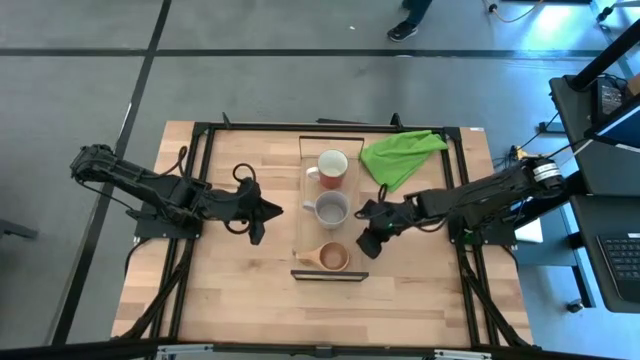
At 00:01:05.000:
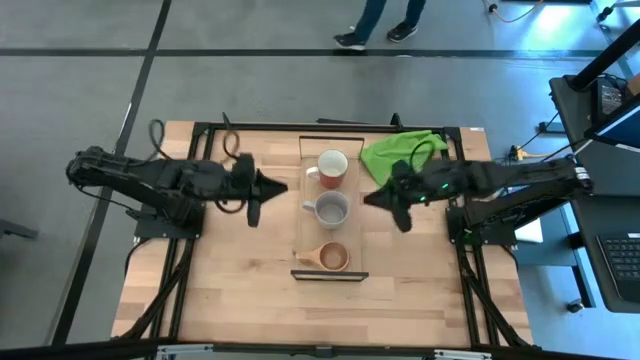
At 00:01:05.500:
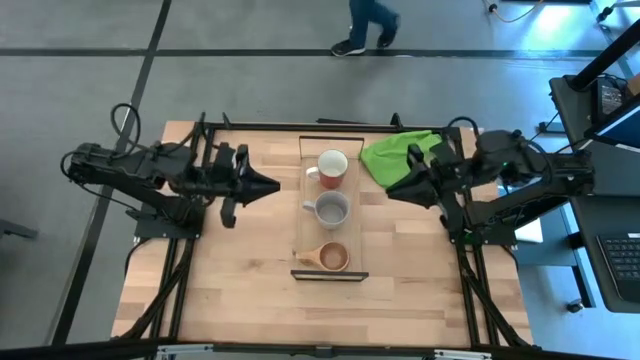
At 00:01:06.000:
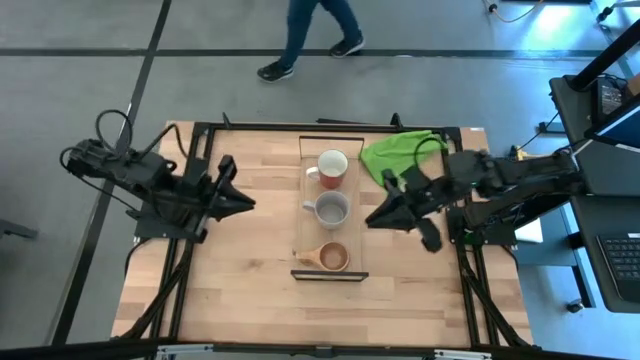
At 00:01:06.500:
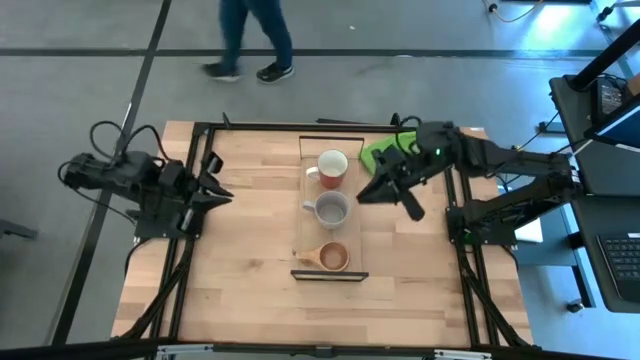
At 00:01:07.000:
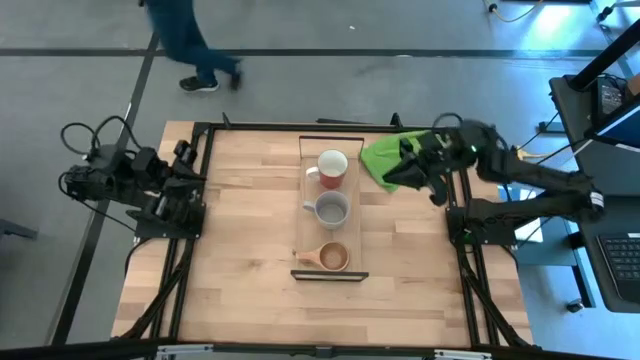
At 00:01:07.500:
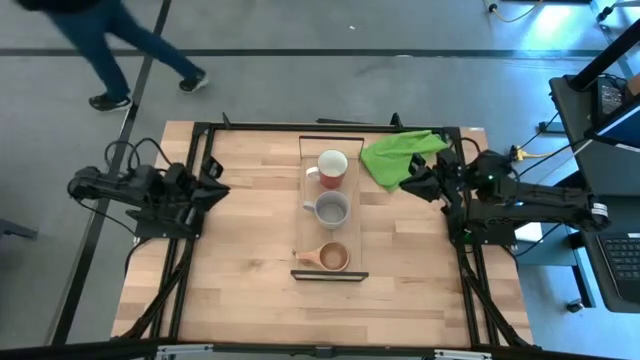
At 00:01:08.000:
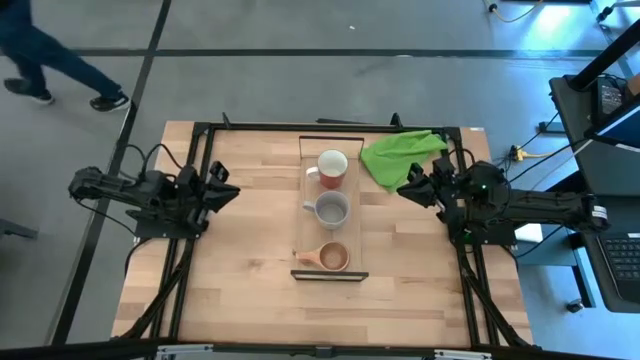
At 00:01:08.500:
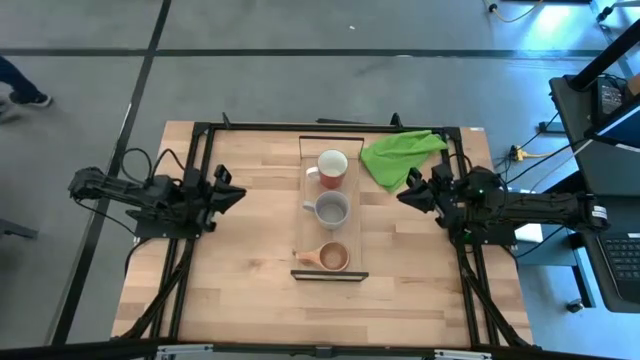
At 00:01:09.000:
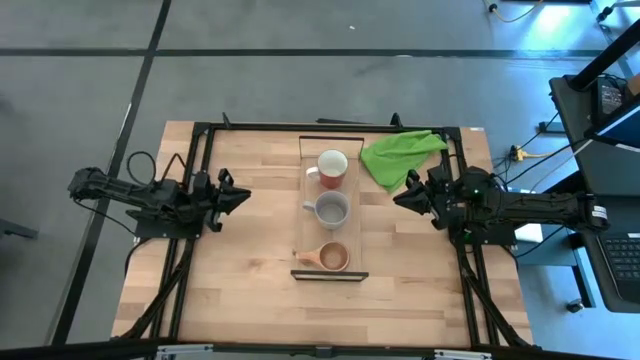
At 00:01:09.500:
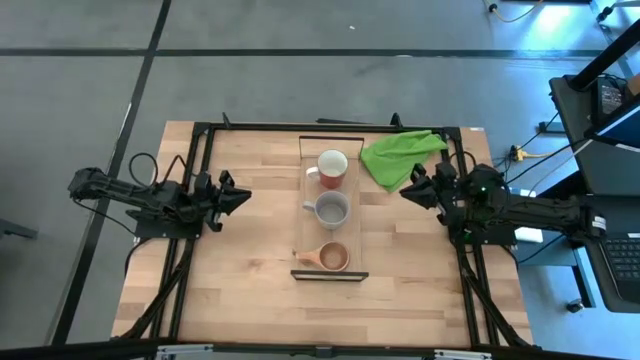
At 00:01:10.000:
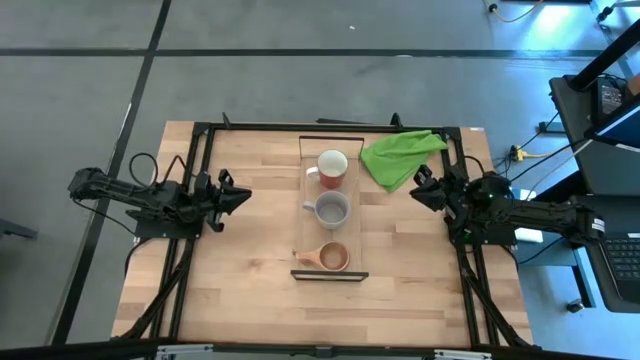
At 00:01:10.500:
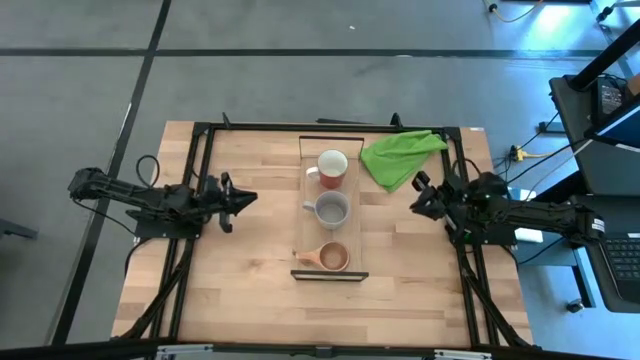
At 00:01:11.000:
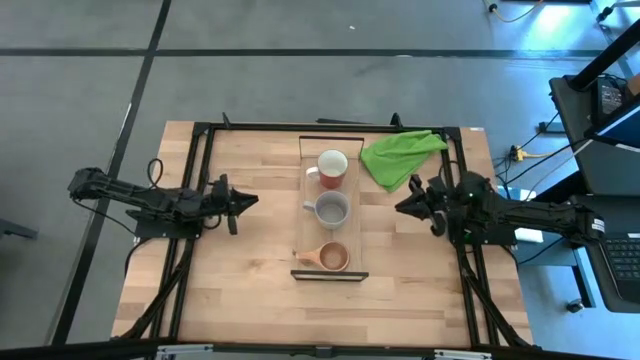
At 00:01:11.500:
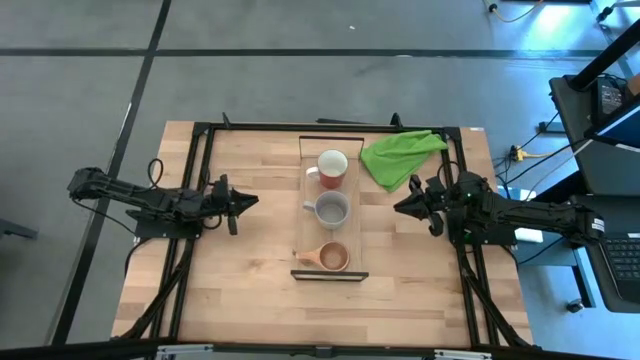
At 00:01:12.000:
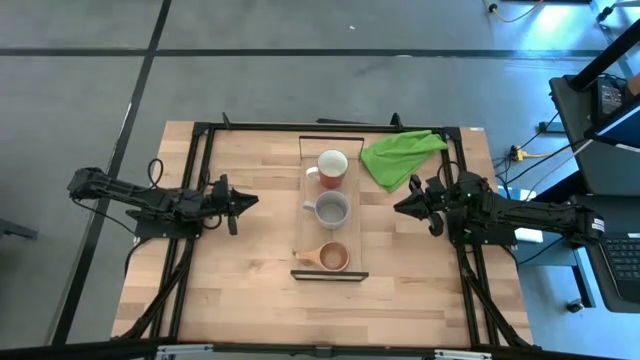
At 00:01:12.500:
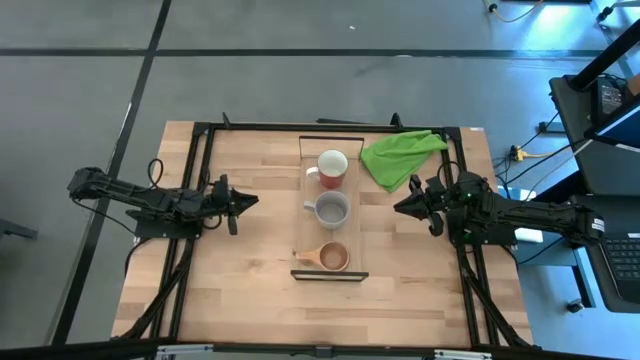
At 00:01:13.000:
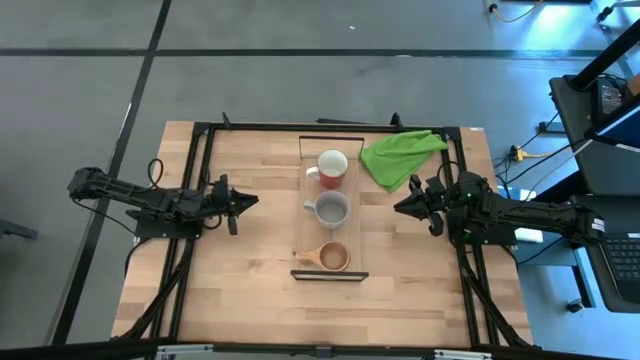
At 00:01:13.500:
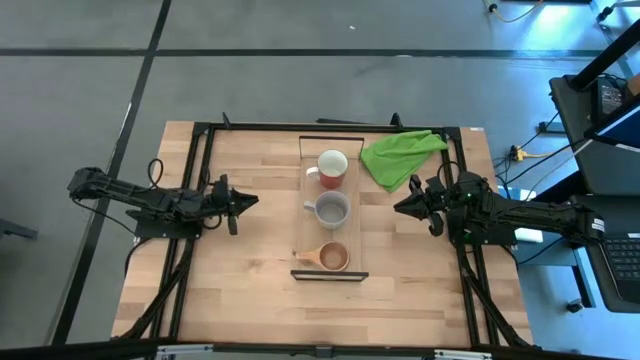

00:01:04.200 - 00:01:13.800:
Task: Stack small to large cups/mugs on shelf
Return to Home Position
